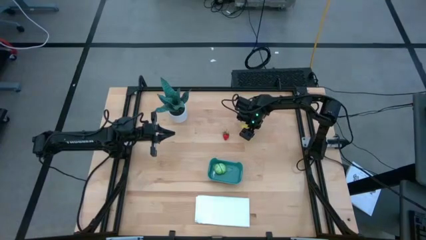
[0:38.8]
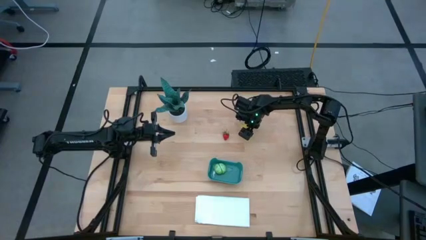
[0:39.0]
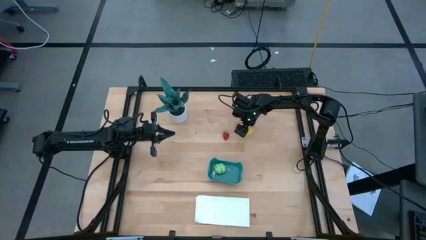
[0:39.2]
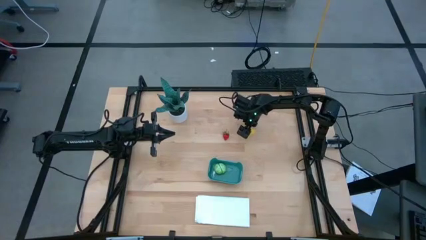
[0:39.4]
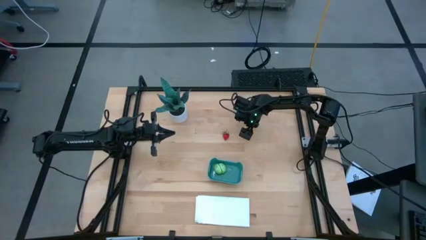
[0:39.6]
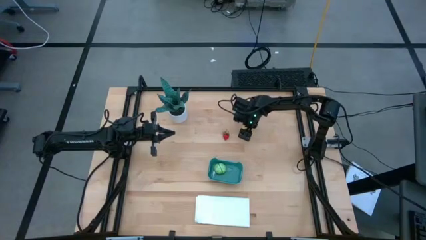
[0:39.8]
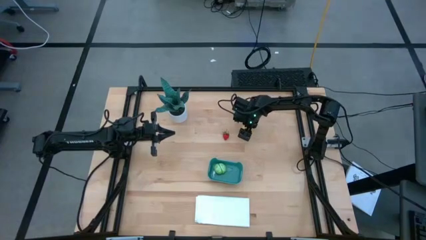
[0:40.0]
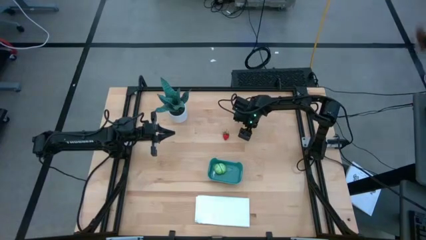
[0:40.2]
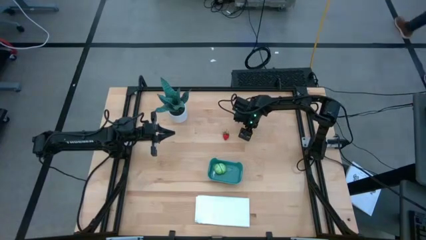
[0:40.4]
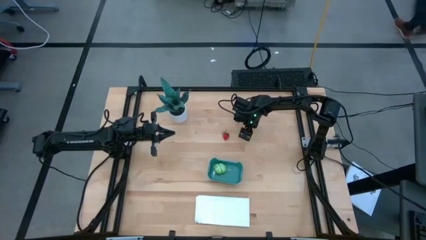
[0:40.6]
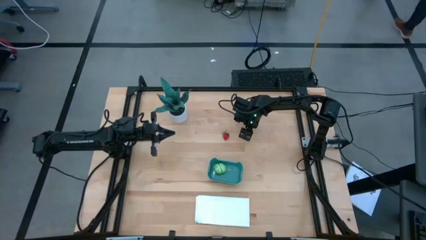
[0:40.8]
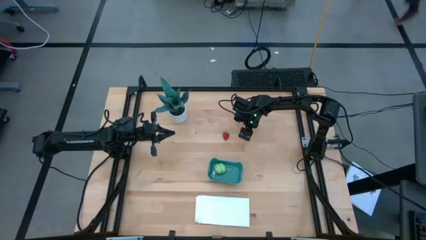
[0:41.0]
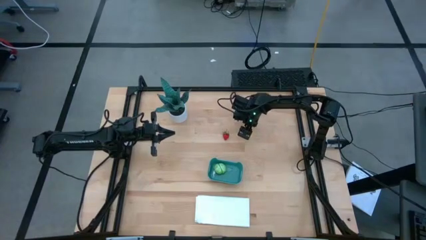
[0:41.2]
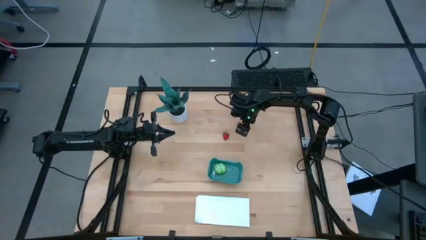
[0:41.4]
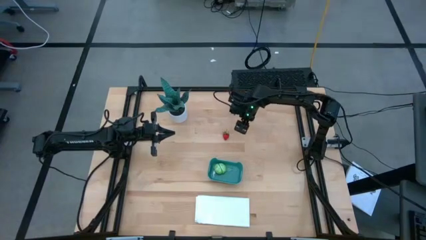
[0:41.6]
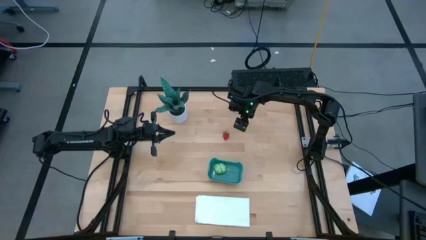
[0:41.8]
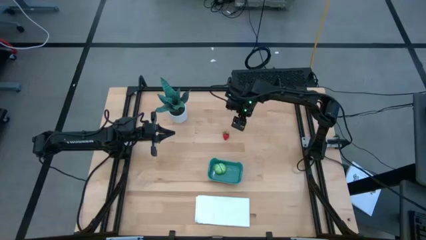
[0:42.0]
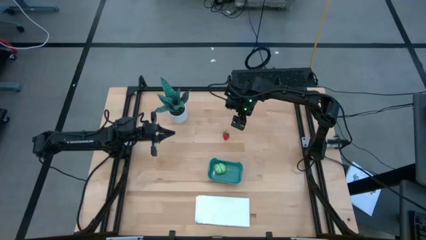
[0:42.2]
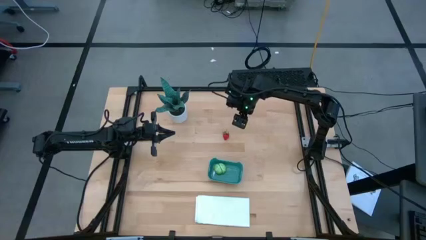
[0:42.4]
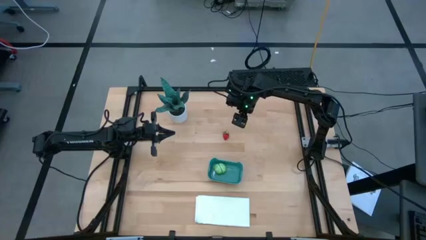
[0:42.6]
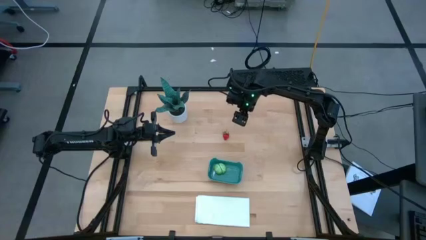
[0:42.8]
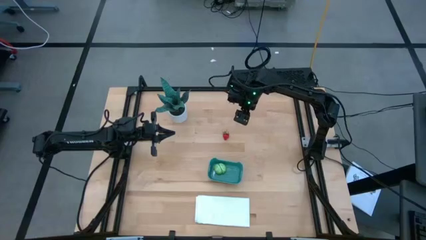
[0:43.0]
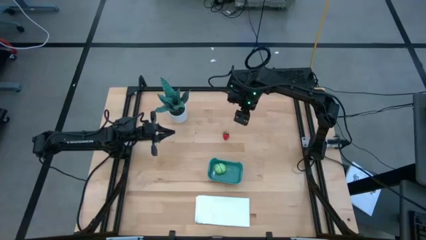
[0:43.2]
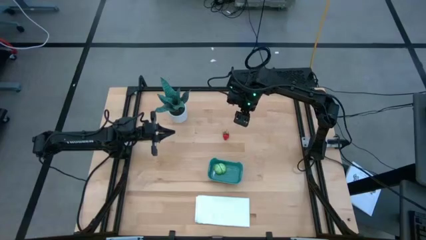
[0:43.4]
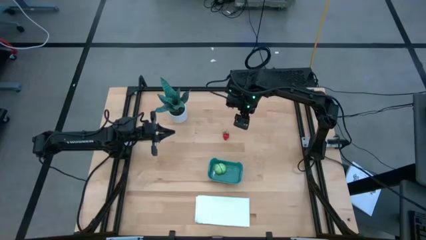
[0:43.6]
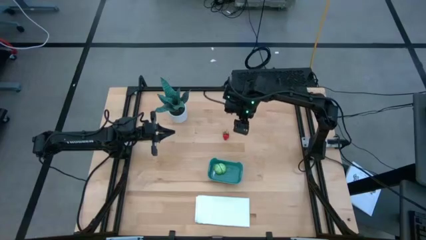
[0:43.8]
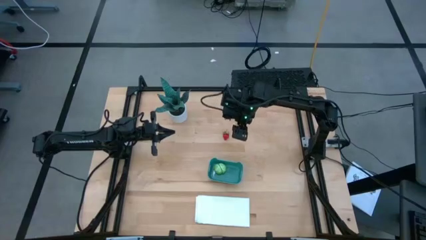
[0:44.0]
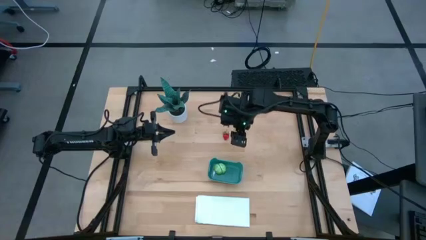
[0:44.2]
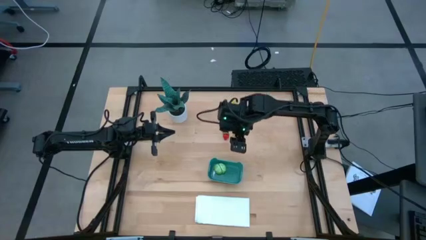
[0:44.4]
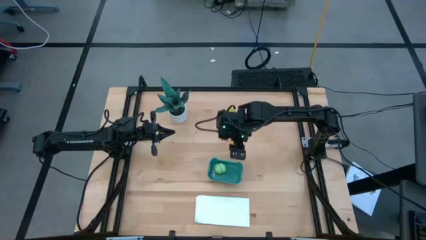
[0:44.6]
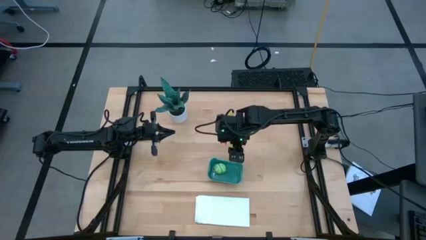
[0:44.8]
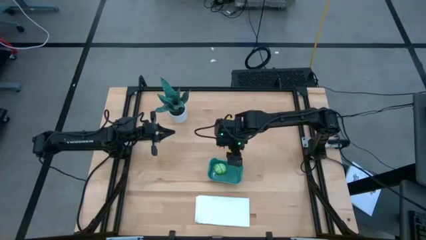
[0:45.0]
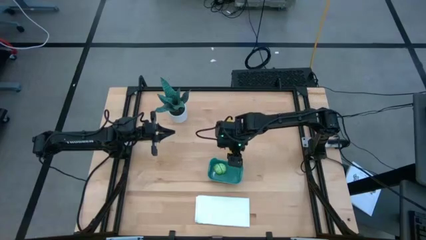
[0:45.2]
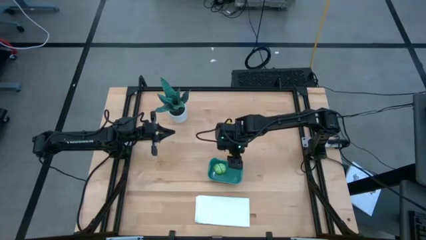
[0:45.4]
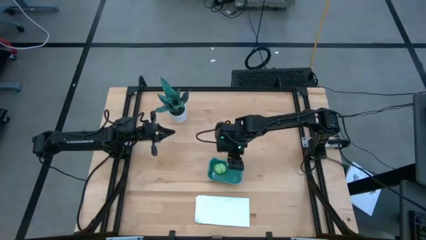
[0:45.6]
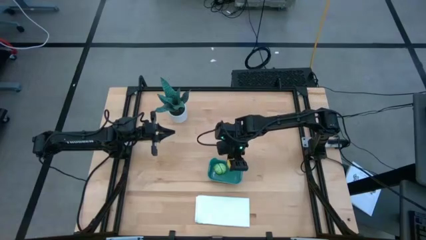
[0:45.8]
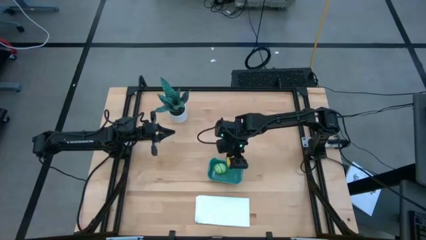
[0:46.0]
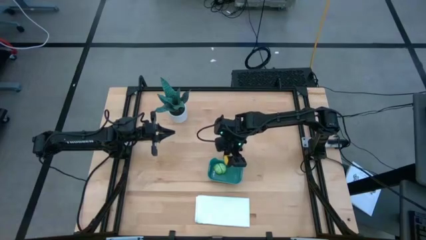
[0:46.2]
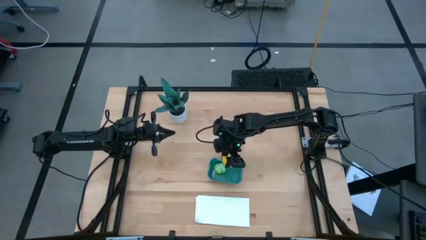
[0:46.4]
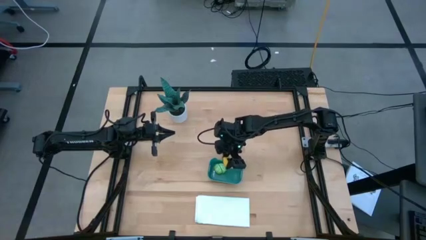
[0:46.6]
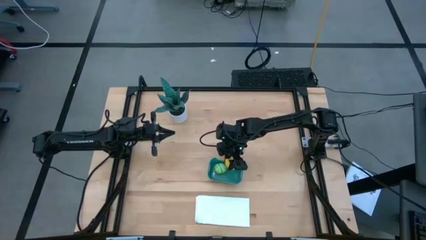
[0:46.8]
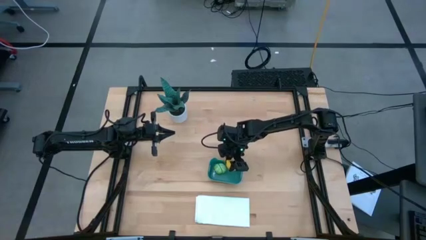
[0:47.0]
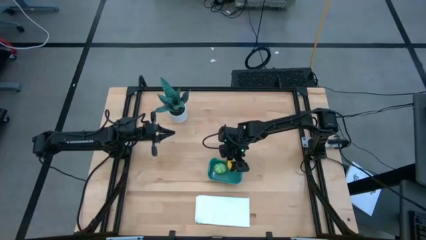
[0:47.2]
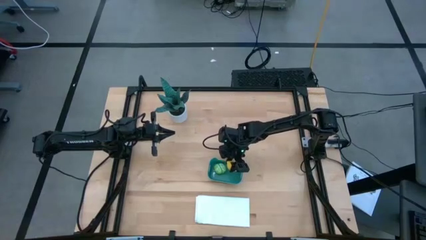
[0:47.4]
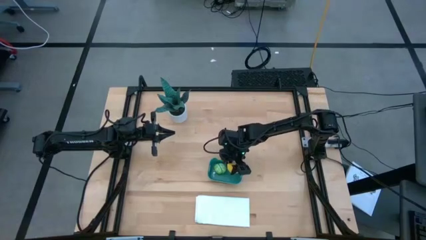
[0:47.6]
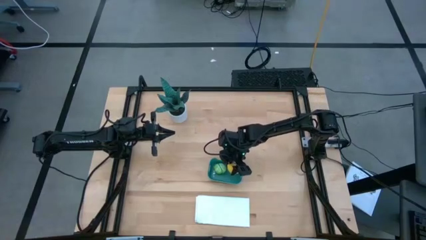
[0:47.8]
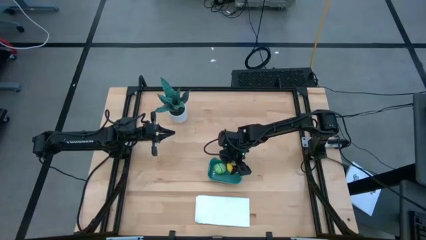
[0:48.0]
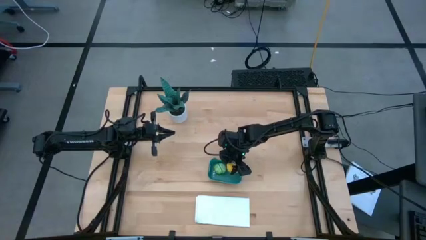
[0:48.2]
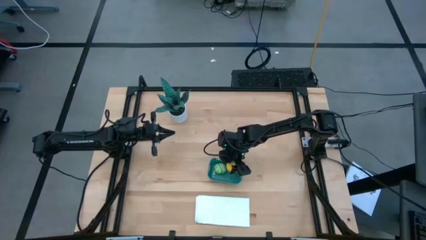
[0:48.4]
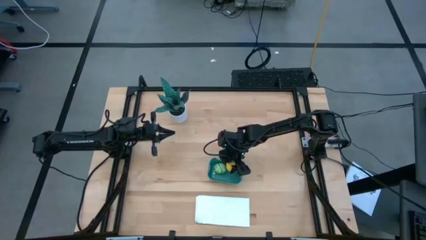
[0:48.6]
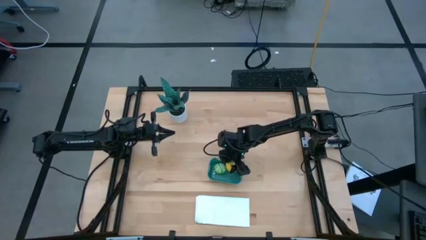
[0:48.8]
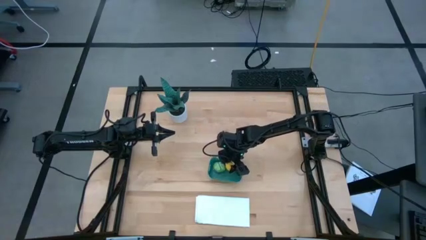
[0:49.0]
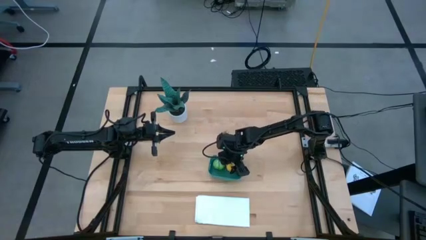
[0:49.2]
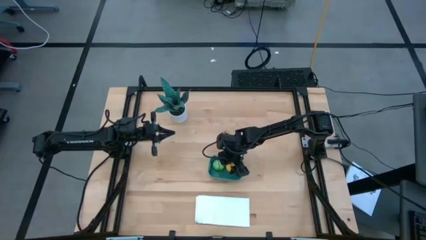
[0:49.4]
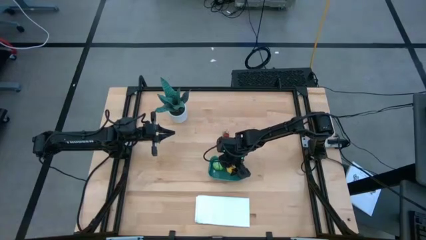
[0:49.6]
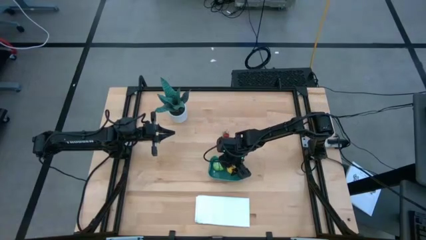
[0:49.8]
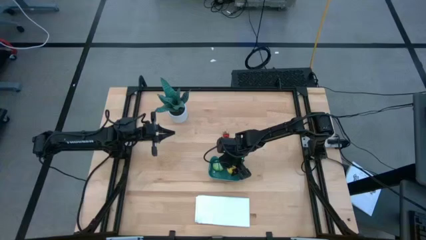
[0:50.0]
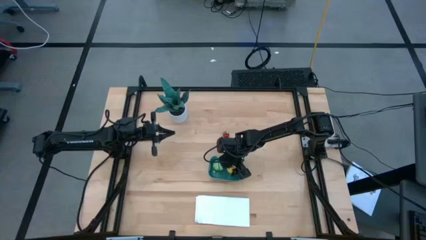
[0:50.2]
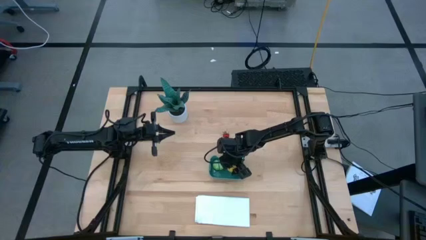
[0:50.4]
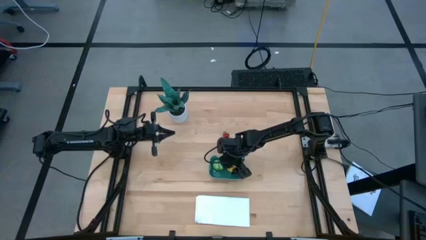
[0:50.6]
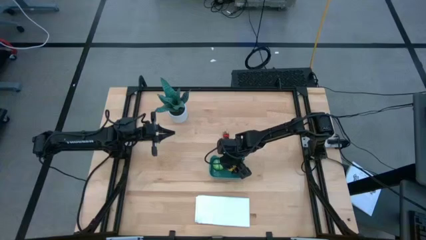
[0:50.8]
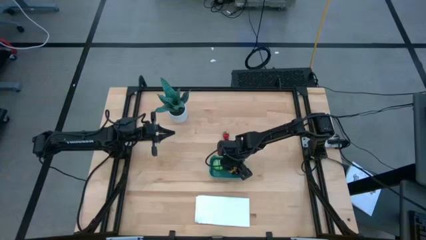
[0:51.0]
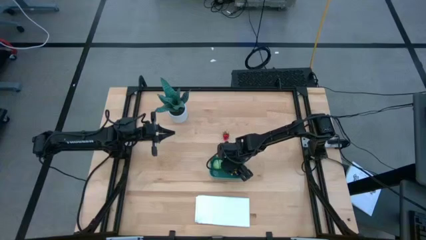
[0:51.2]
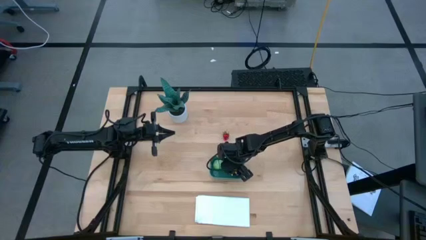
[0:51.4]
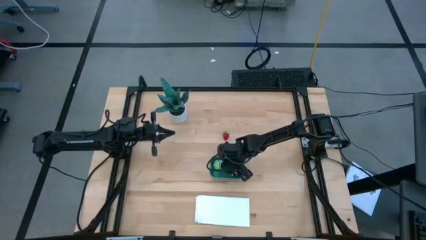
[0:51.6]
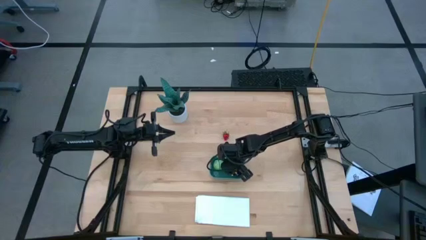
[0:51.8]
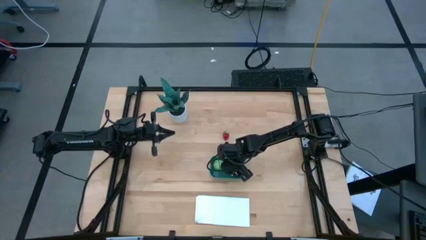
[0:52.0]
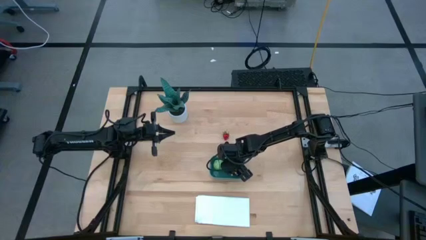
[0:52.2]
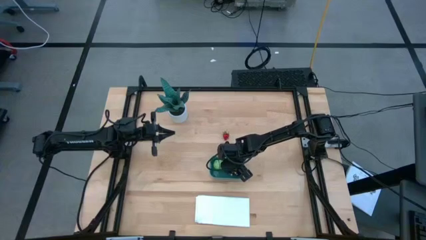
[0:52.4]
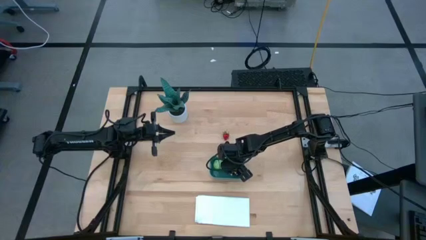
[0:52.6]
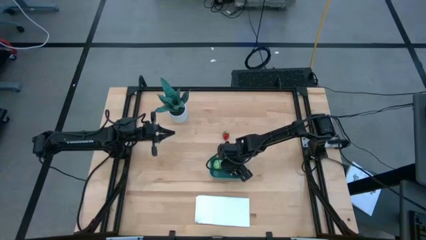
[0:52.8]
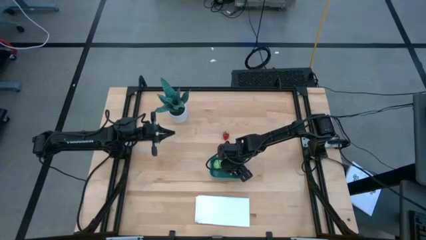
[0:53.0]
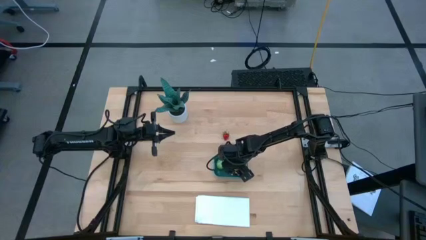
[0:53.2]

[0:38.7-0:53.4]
Task: Pick and placing Produce into tupperware
Put the lemon into the bin
